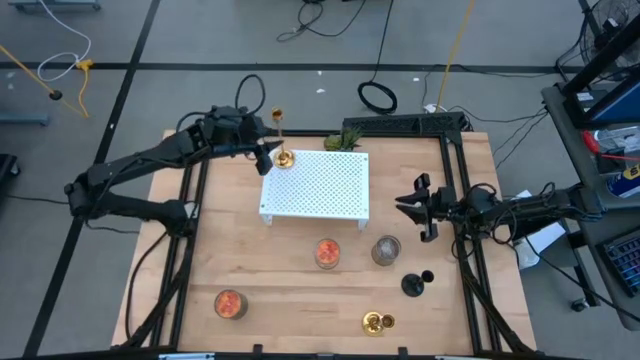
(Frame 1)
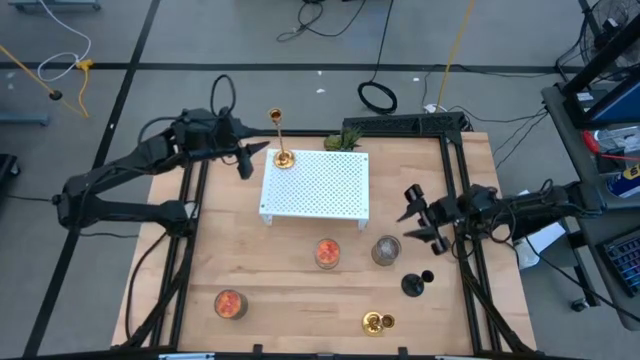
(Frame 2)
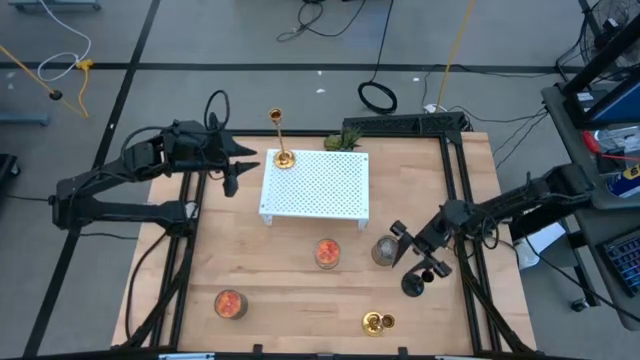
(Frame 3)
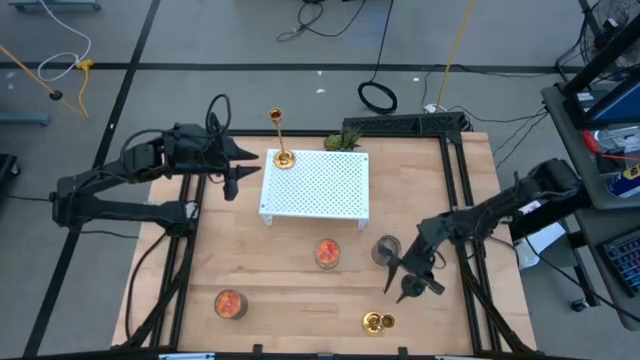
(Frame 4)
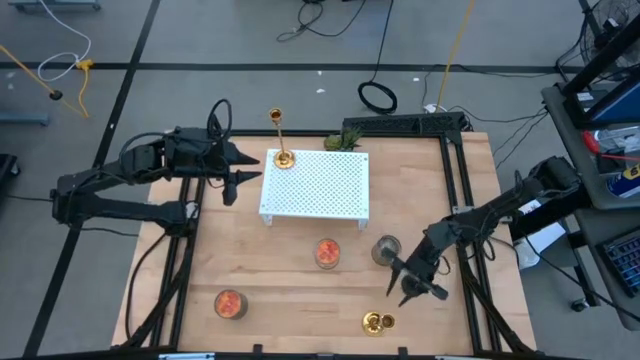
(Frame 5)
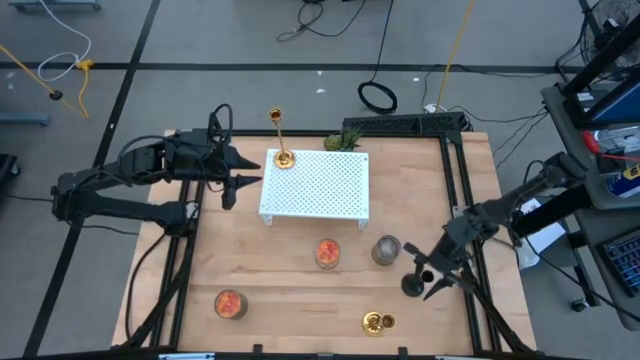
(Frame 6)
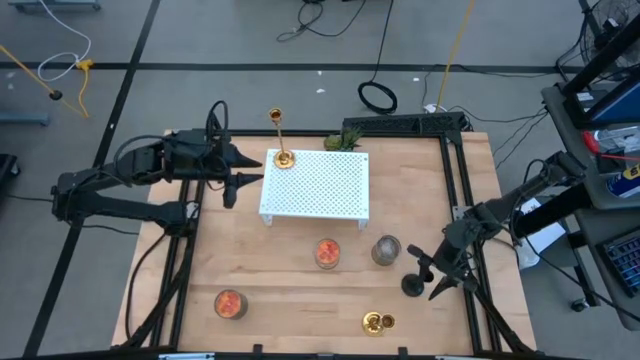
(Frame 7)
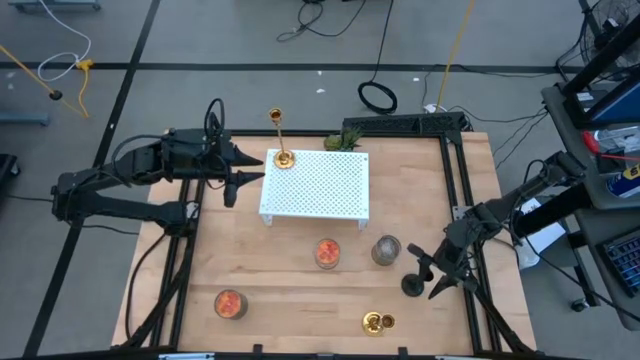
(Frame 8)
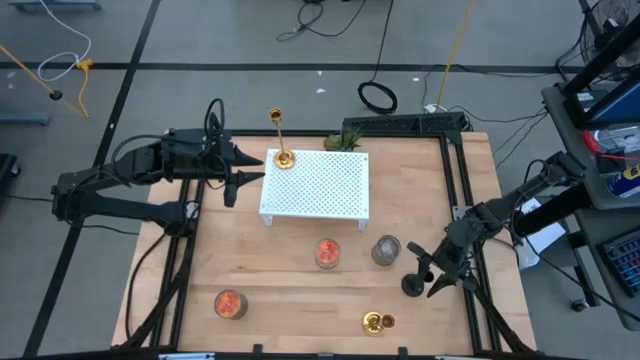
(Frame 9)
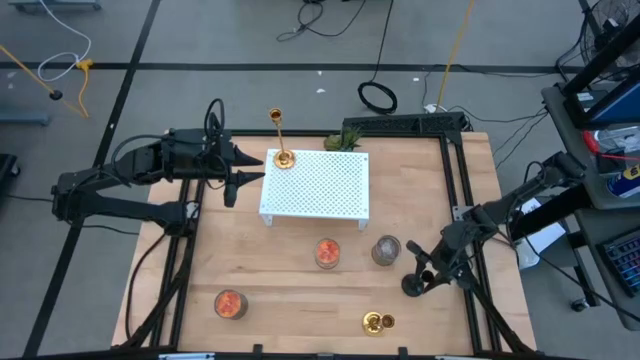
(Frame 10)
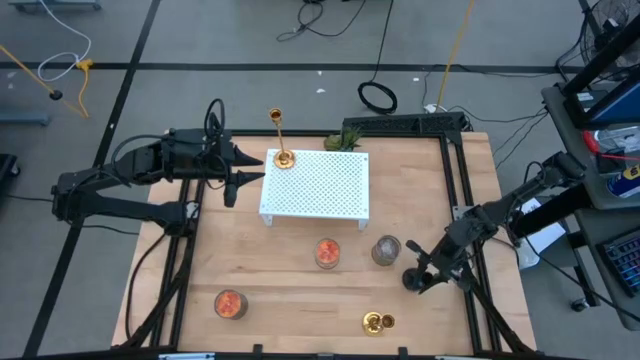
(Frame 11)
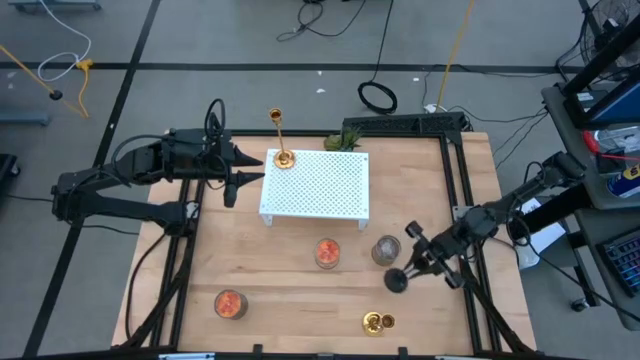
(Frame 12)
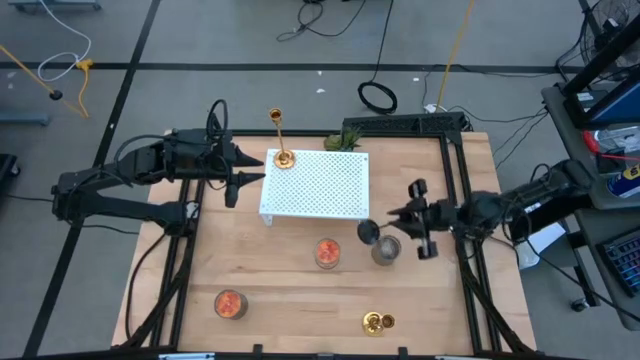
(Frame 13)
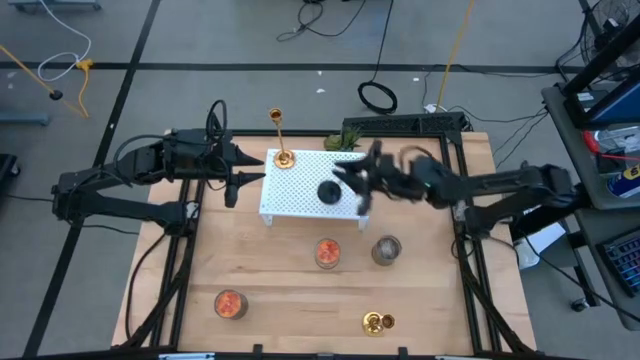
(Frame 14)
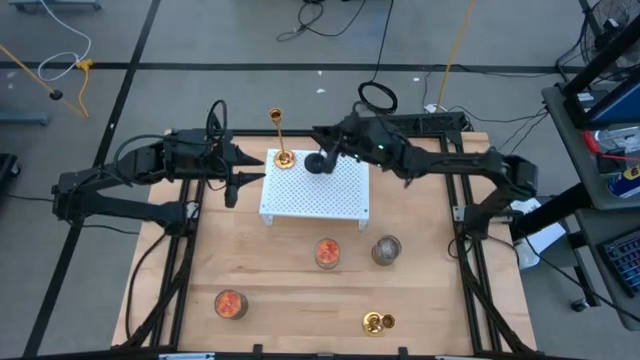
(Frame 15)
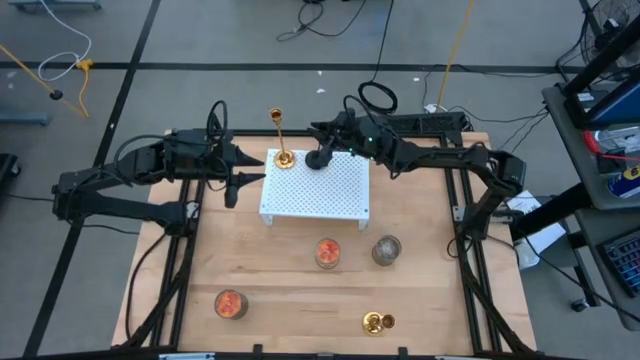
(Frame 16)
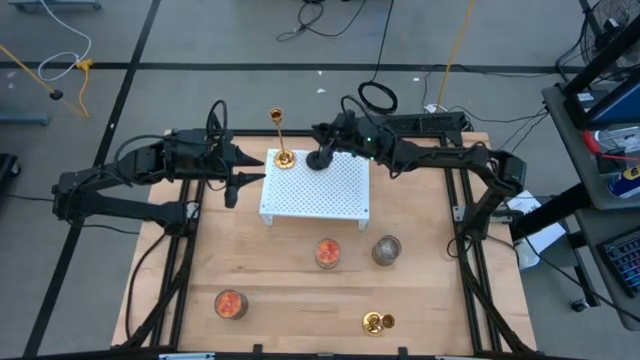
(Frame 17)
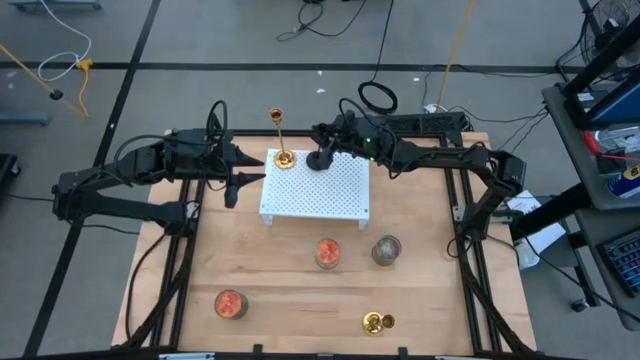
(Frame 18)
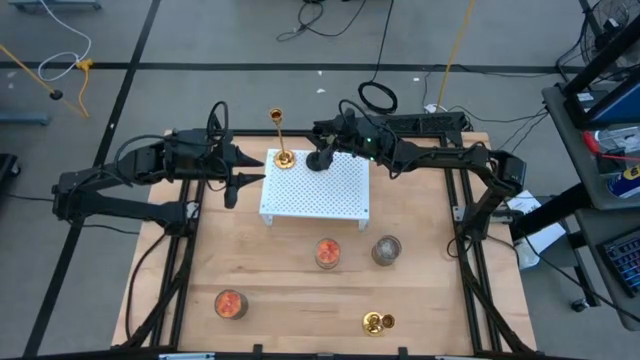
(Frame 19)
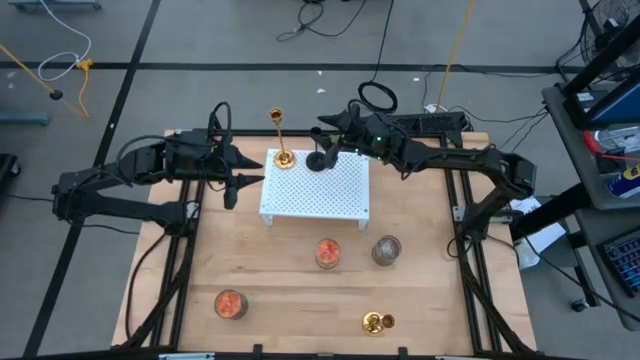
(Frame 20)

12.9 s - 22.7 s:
Task: Pick & Place candle stick holders
Put the small black candle holder on the shelf

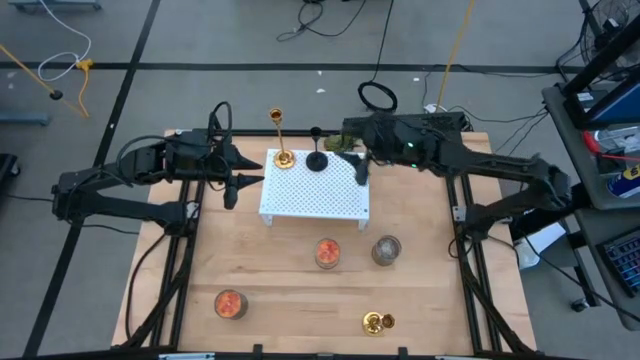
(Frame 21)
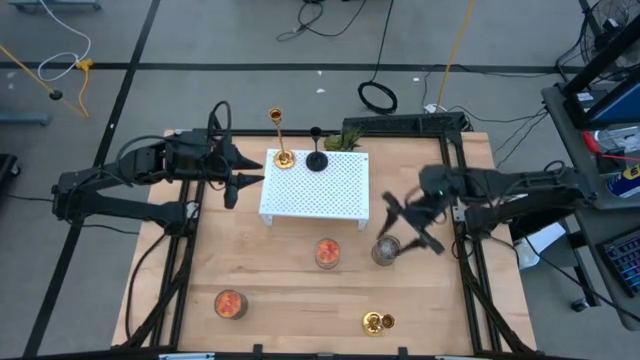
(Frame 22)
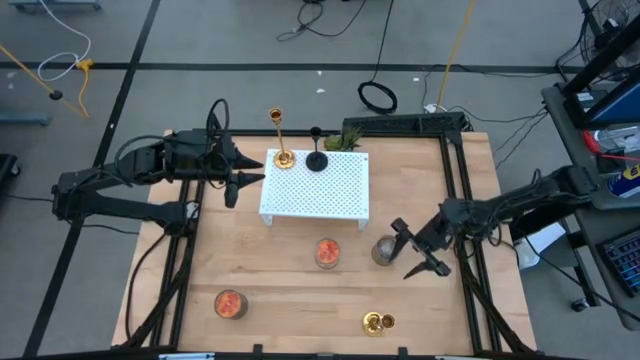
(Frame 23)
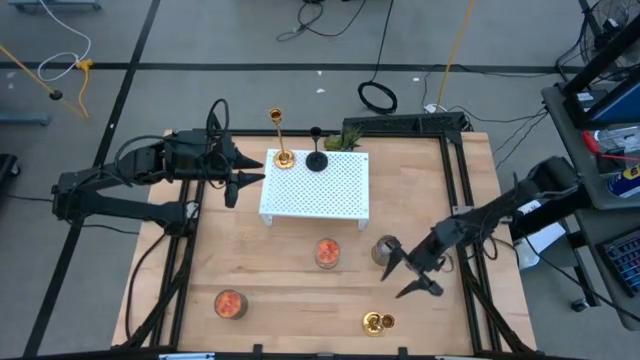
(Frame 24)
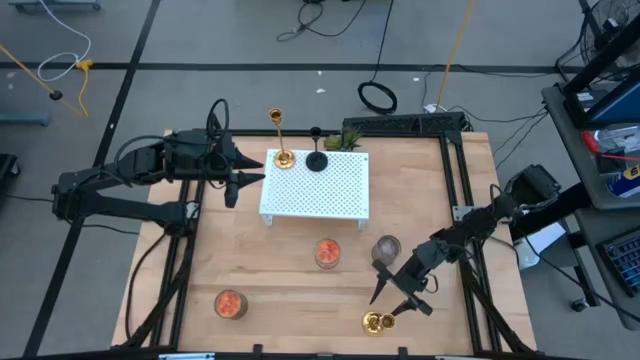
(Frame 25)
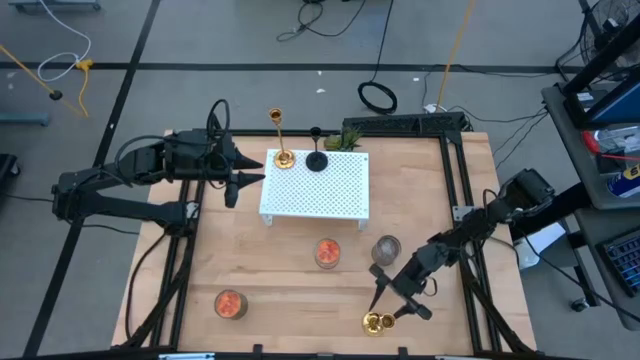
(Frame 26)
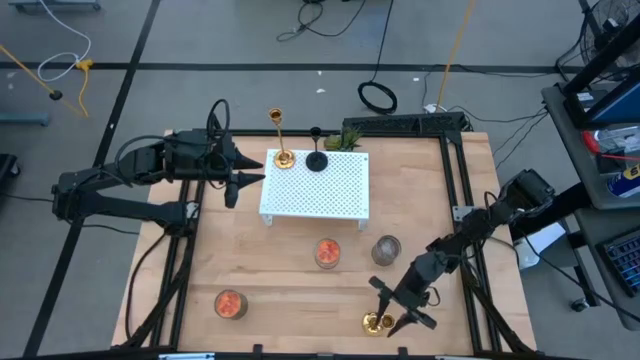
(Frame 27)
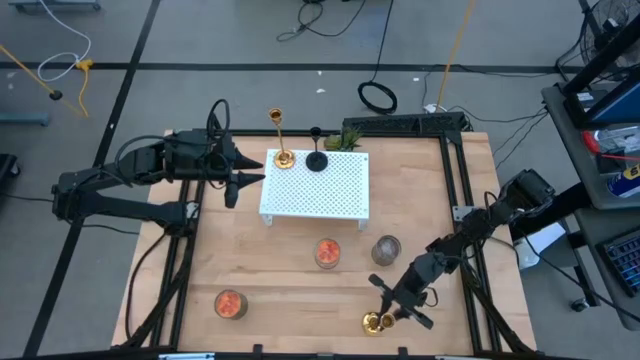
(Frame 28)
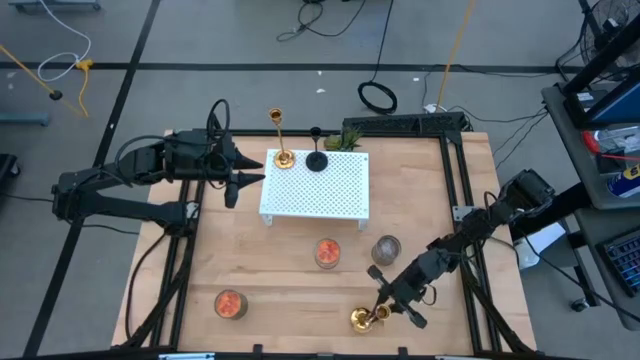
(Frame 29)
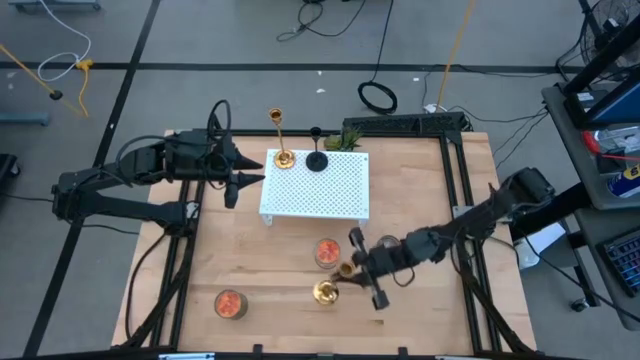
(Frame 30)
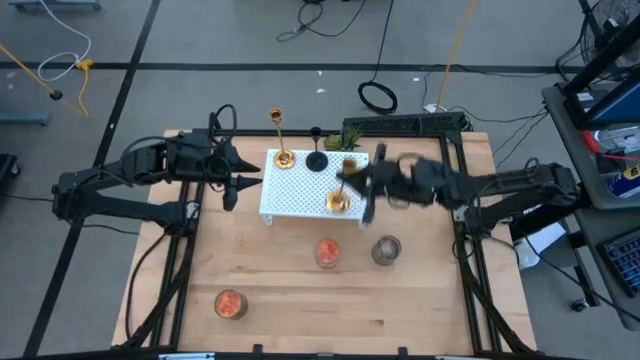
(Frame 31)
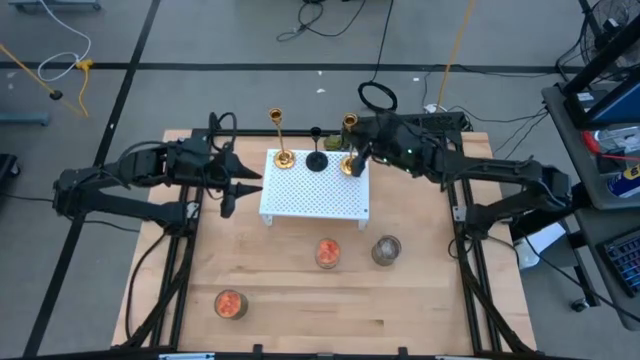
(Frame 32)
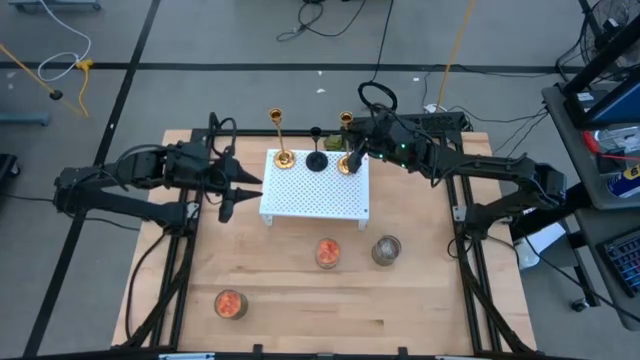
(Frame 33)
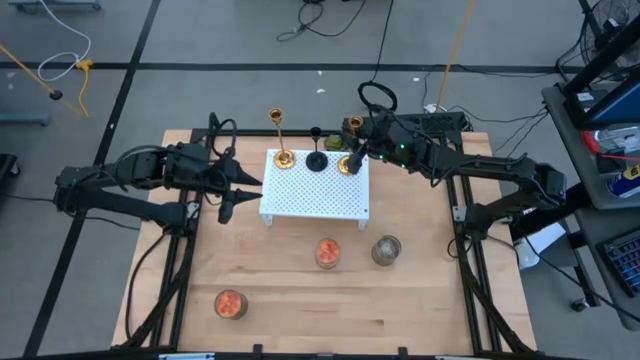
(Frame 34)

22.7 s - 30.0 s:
Put the gold candle holder on the shelf

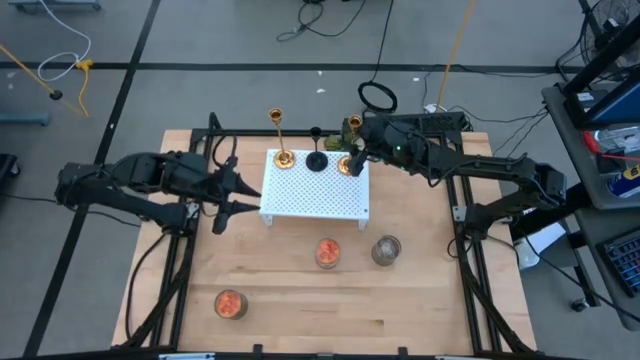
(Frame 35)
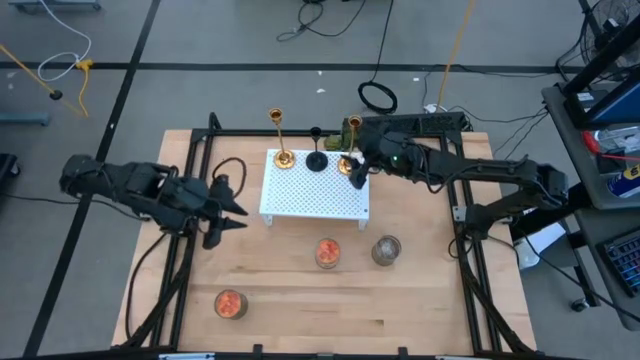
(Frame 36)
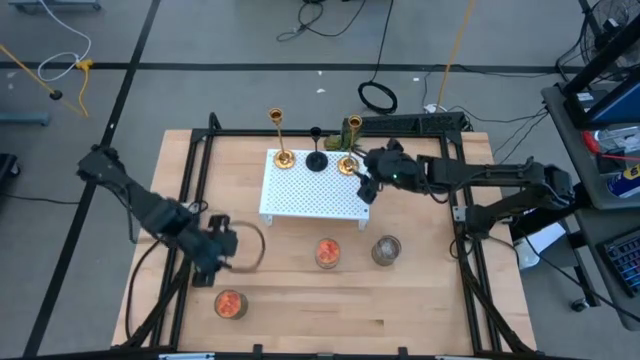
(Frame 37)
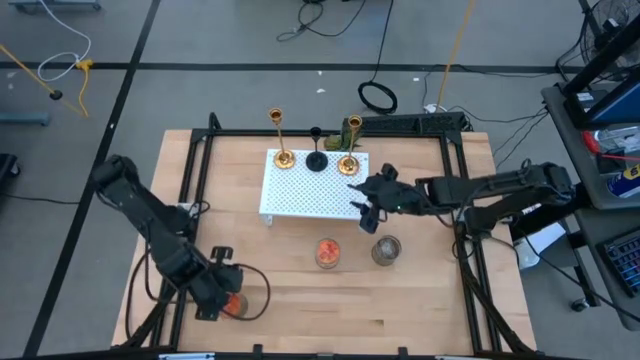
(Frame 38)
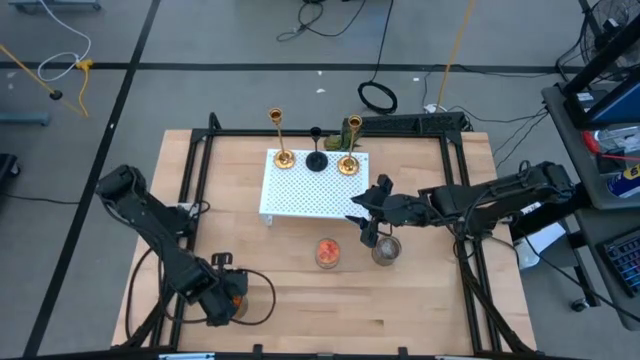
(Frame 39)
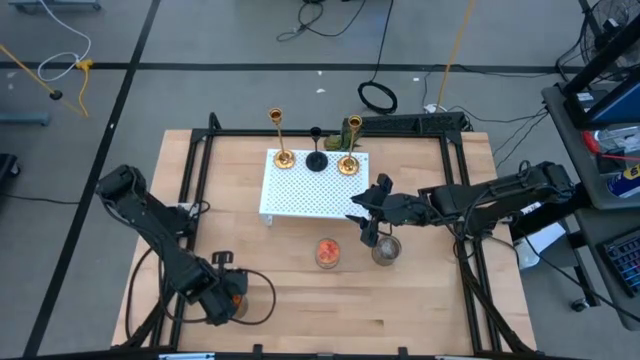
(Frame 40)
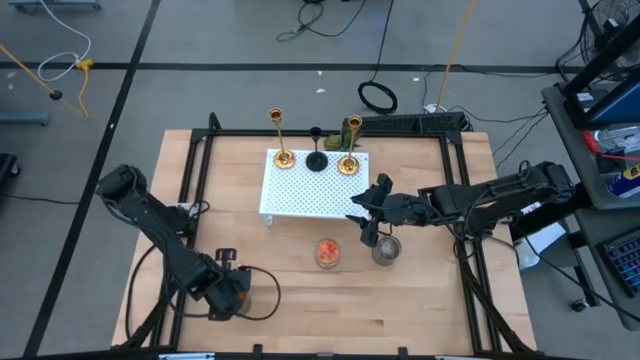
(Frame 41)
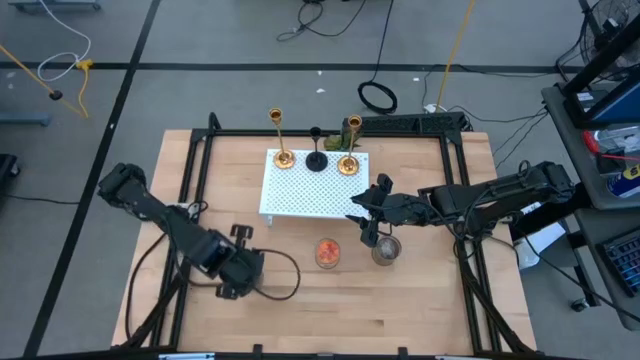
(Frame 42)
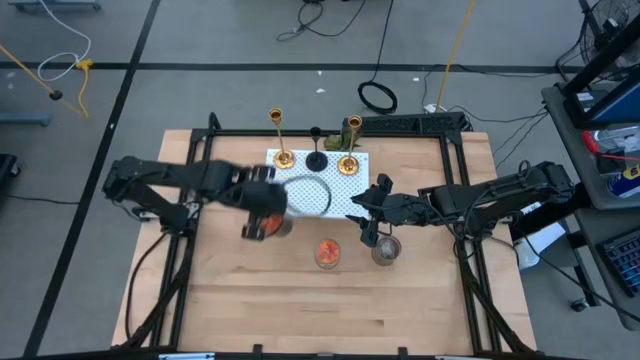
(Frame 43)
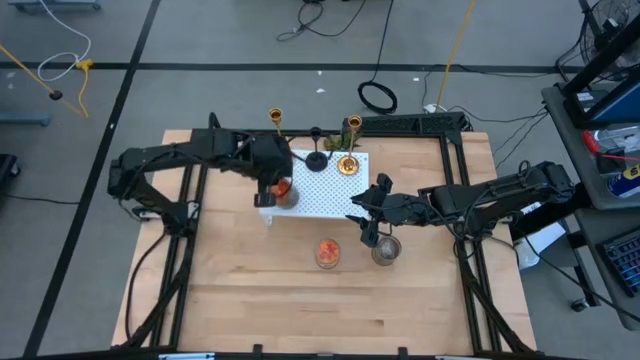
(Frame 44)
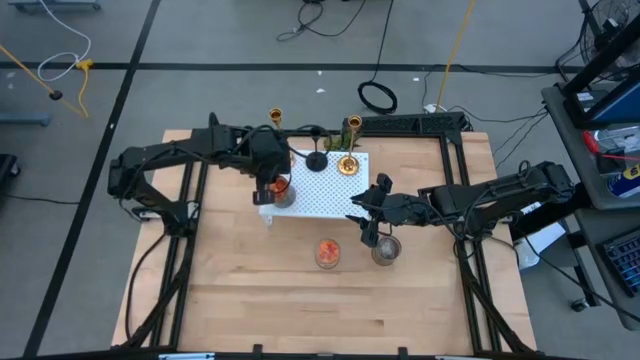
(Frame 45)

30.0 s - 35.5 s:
Put the bottom orange candle on the shelf
